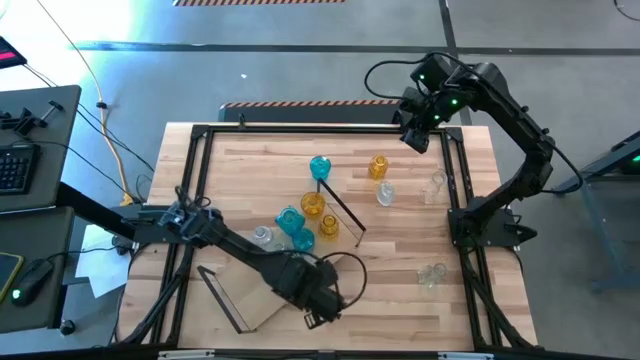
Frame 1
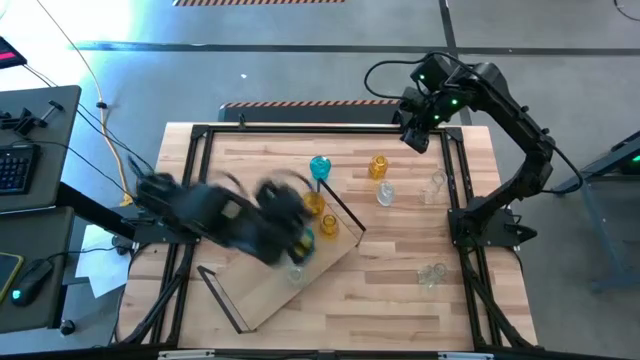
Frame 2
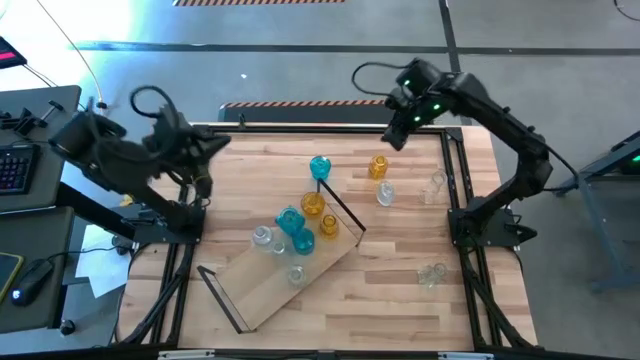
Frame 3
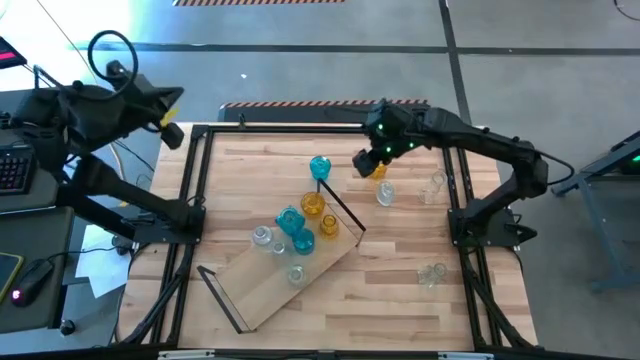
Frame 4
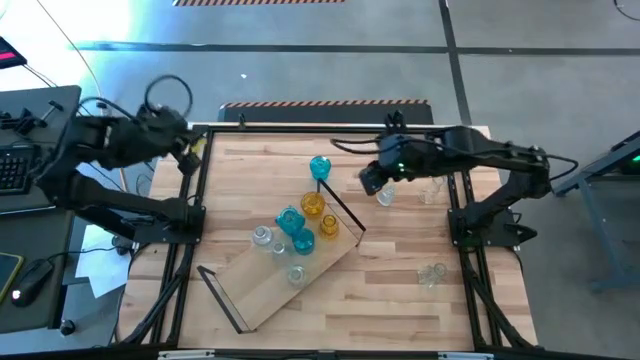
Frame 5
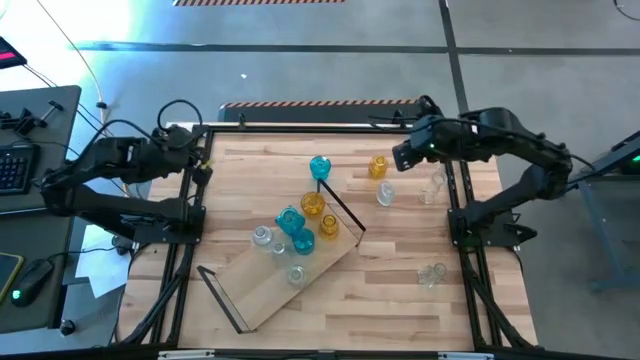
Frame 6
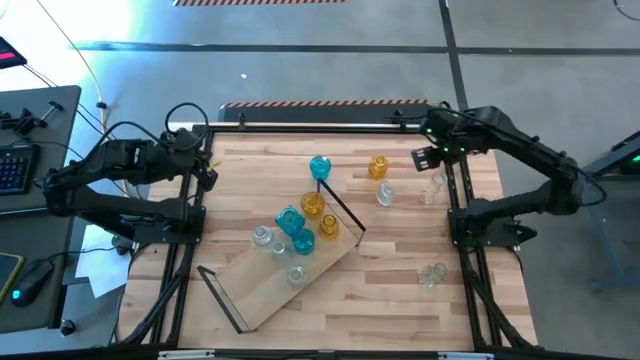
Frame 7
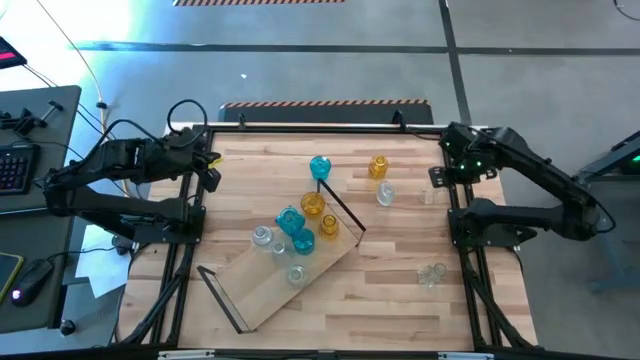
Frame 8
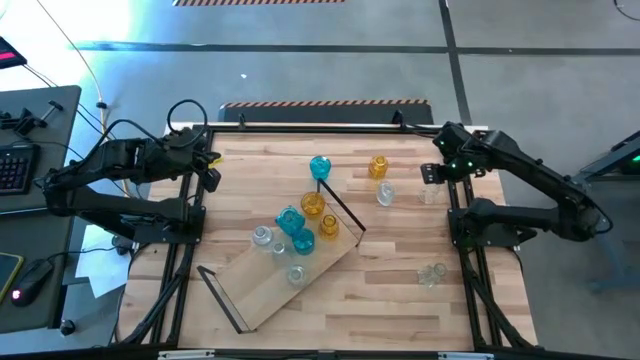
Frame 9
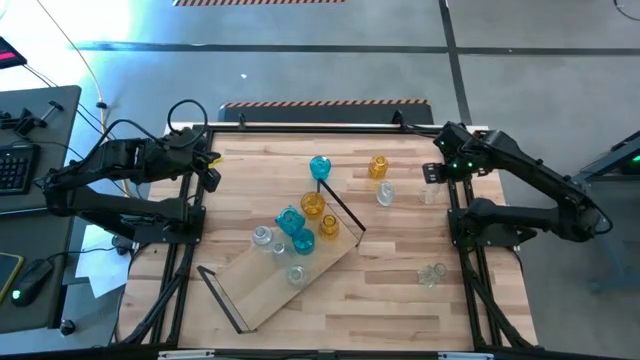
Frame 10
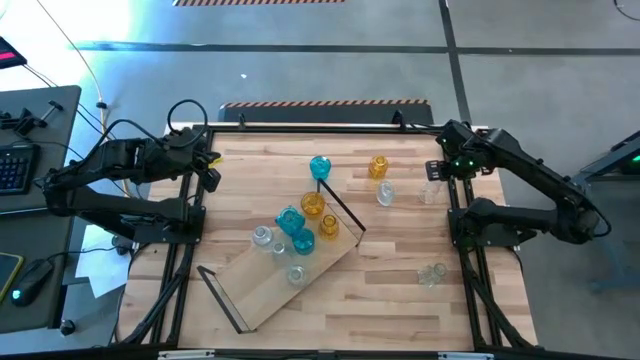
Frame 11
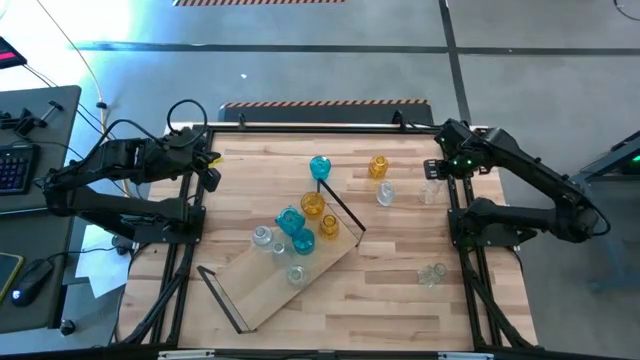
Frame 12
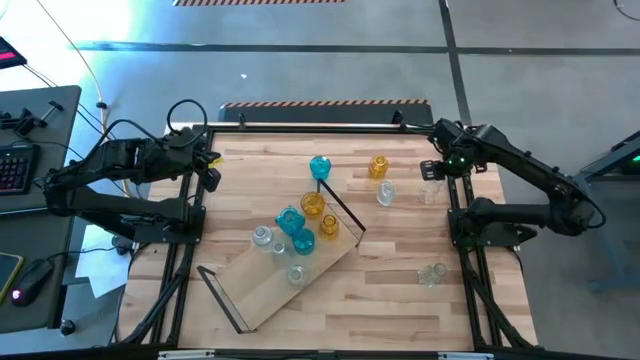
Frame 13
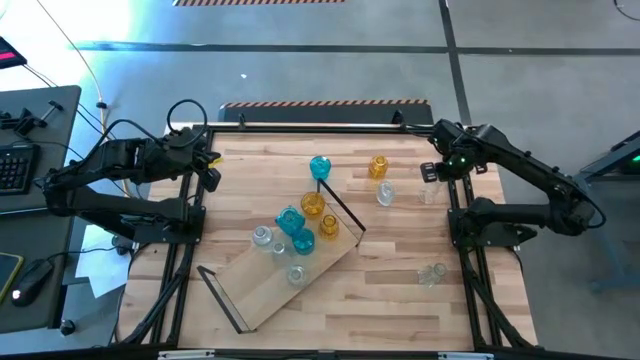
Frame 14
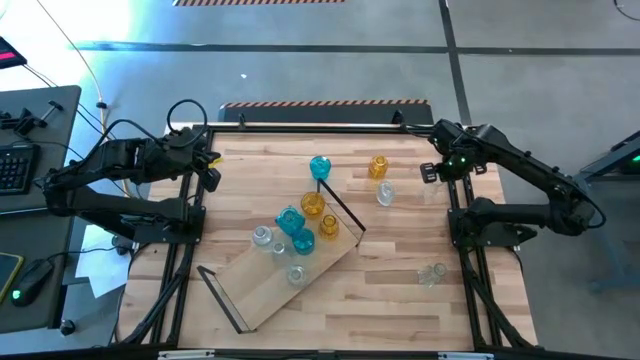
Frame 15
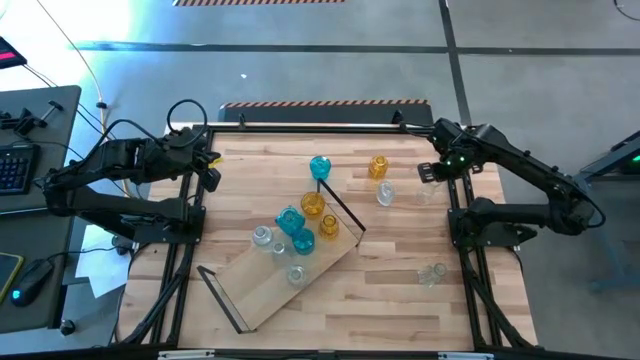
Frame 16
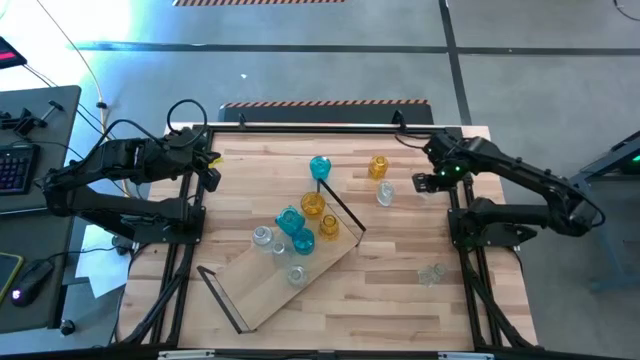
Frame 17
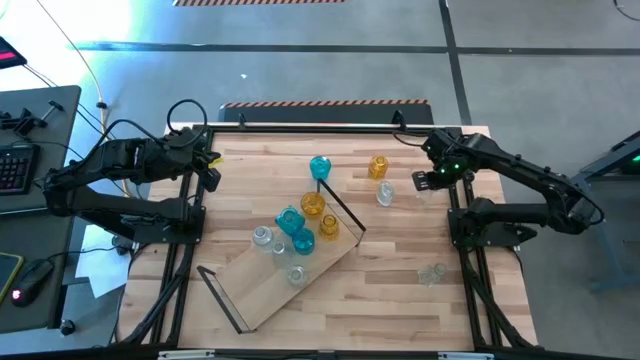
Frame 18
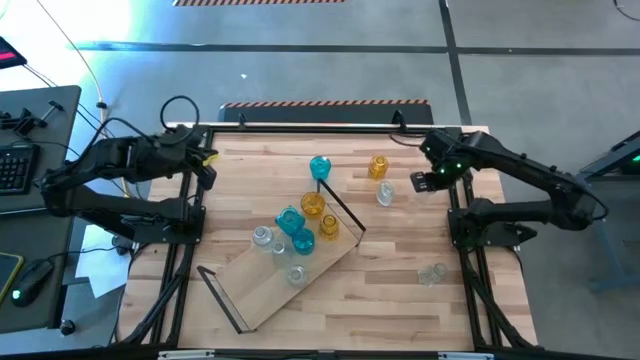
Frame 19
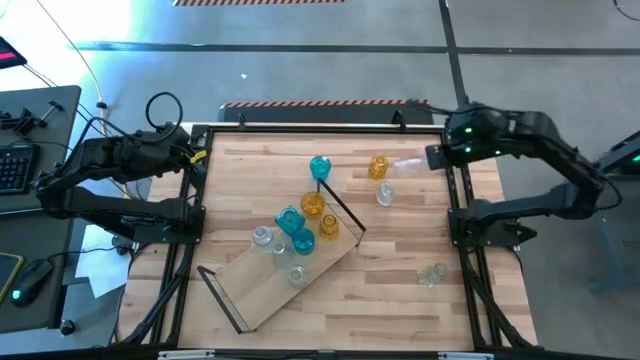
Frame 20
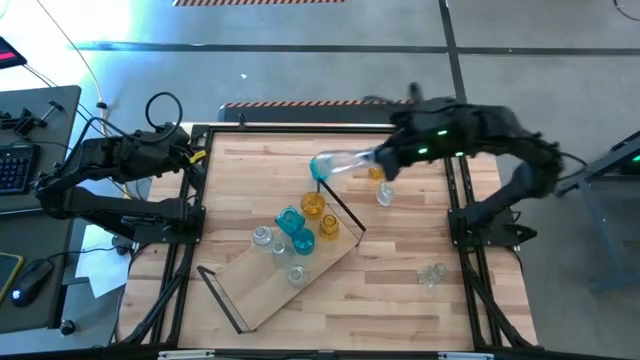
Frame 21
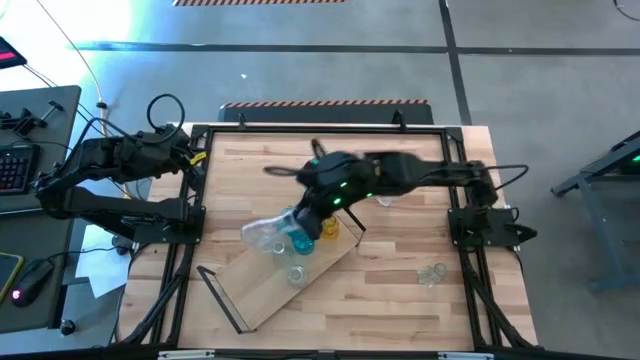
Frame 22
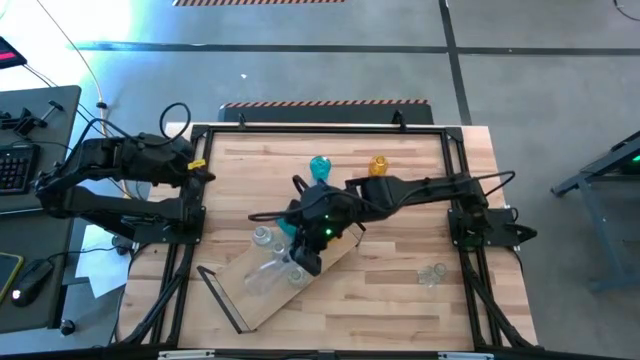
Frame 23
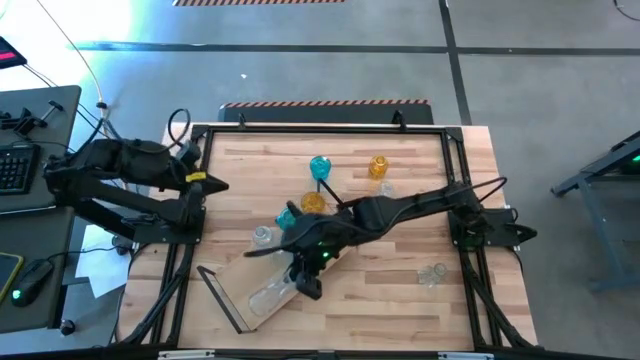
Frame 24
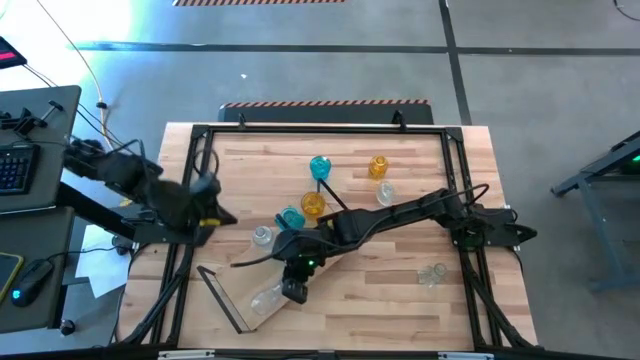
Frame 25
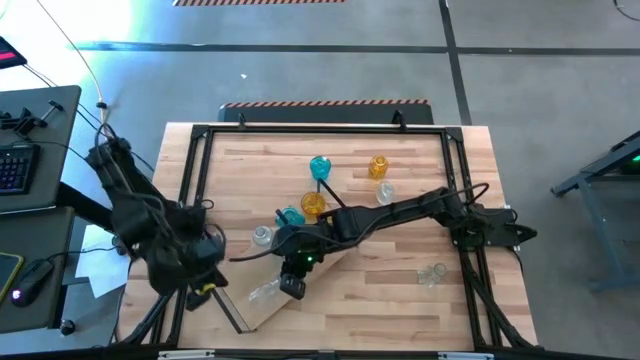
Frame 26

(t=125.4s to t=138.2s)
Task: sort vases onto shelf
Put the transparent vase on the shelf

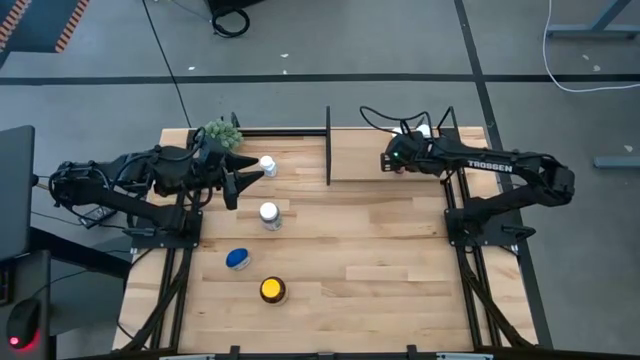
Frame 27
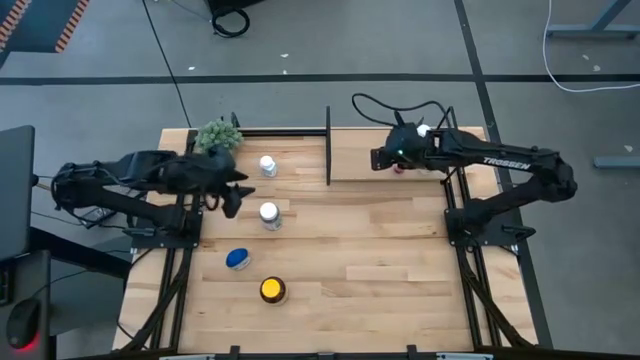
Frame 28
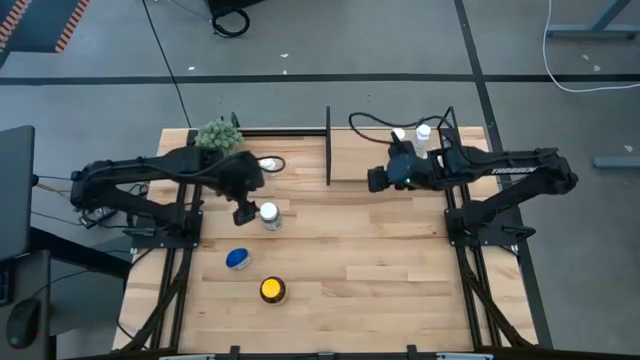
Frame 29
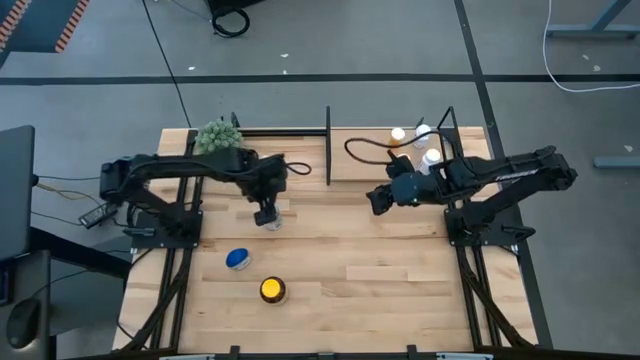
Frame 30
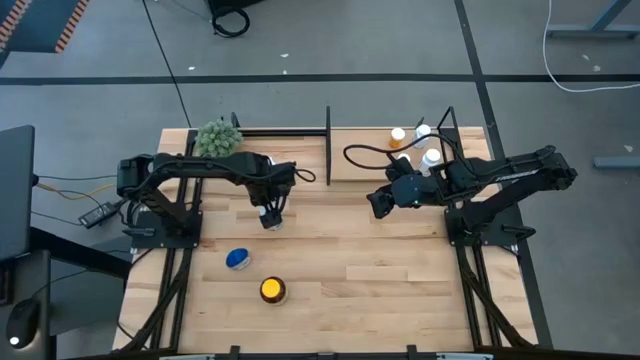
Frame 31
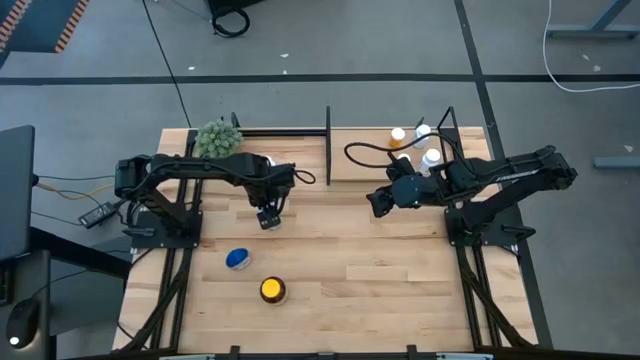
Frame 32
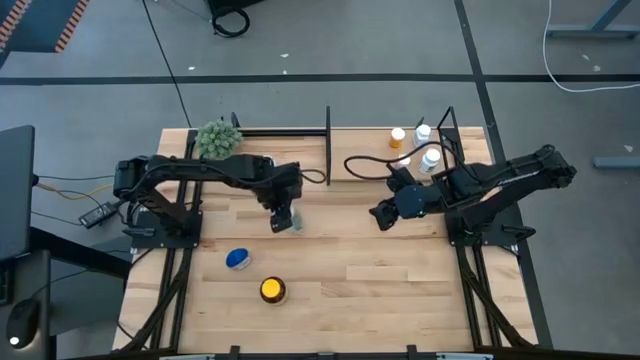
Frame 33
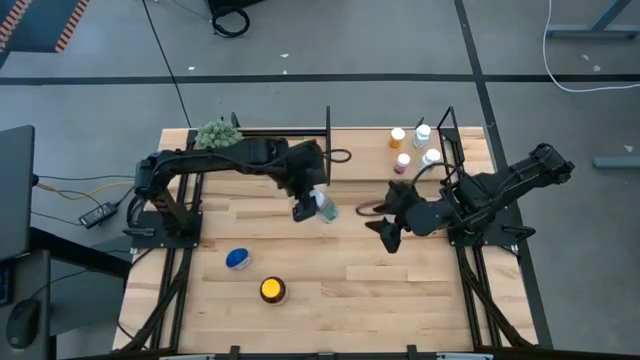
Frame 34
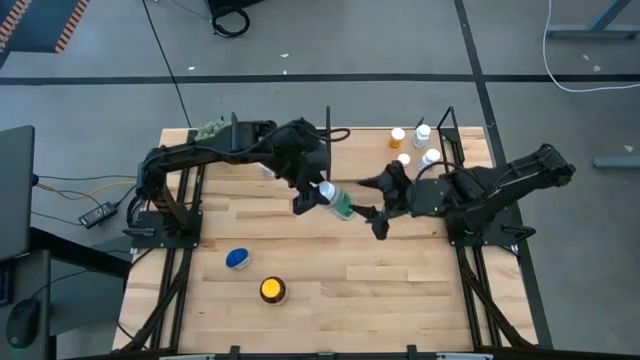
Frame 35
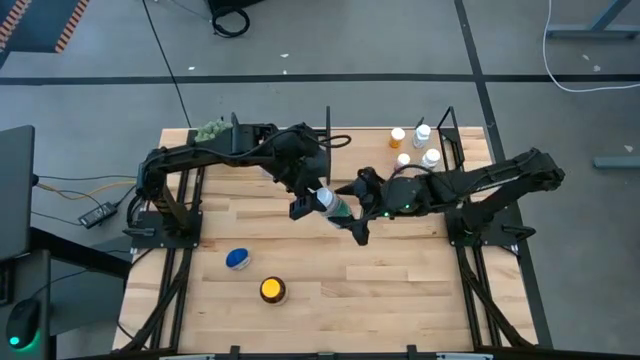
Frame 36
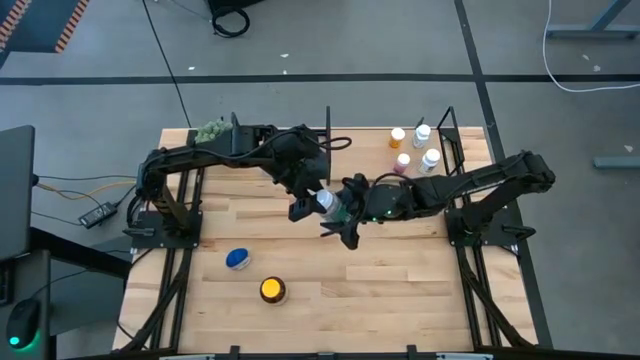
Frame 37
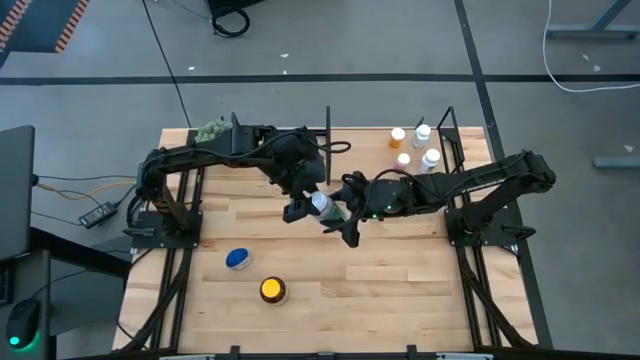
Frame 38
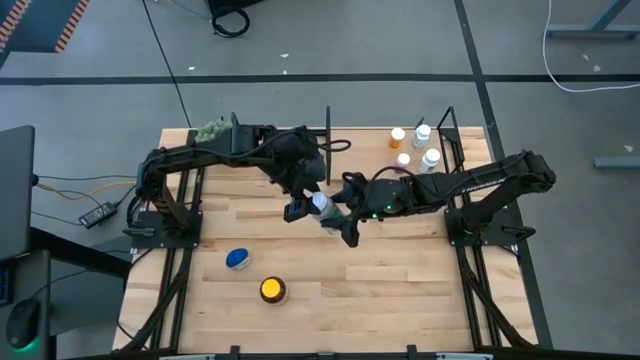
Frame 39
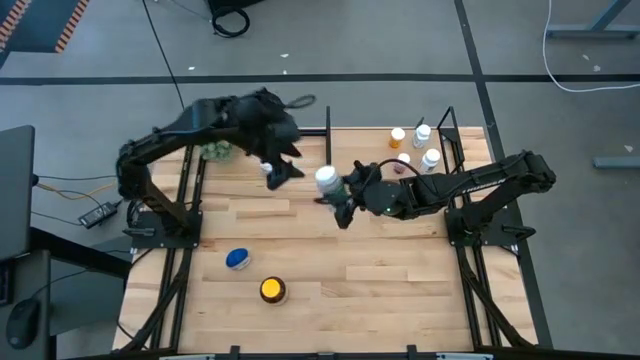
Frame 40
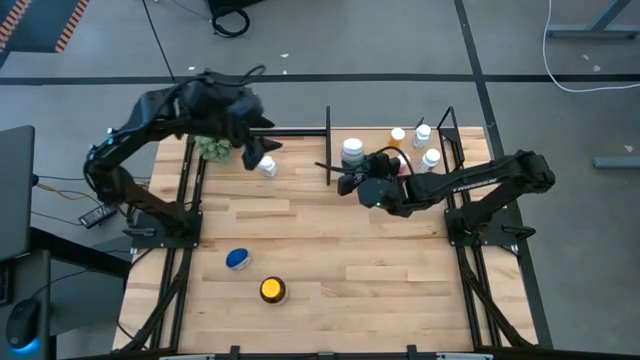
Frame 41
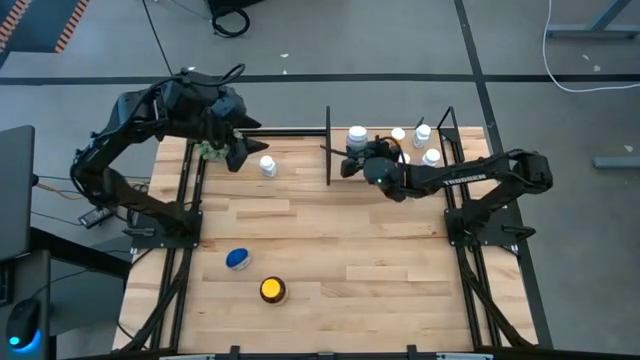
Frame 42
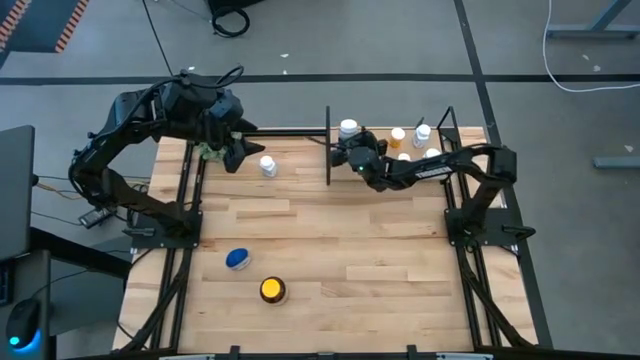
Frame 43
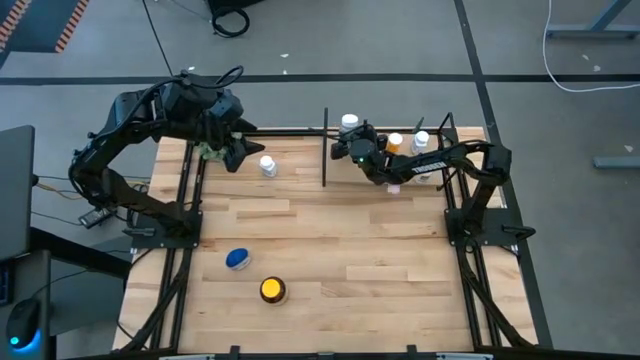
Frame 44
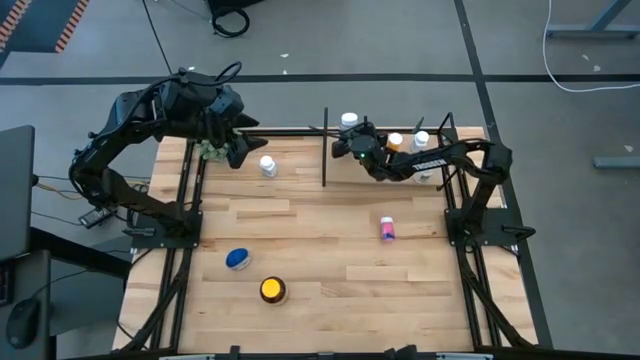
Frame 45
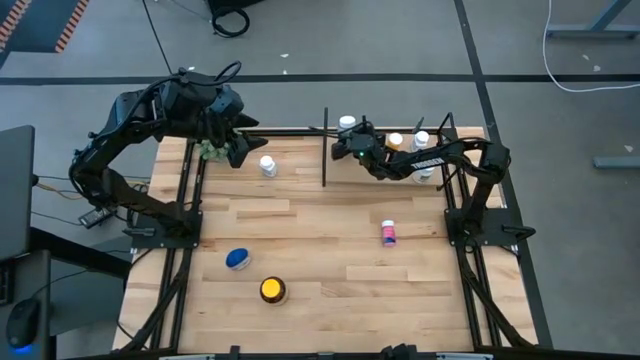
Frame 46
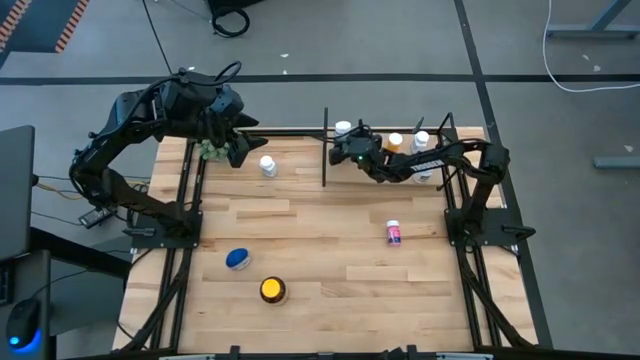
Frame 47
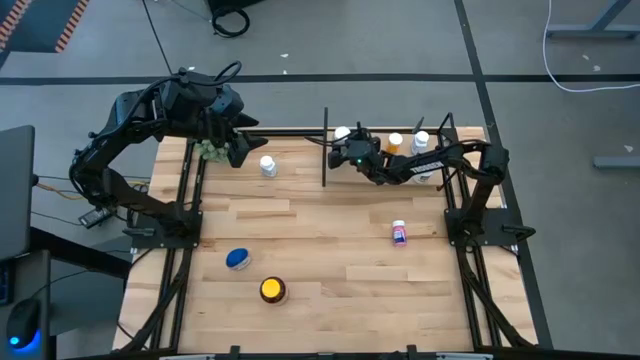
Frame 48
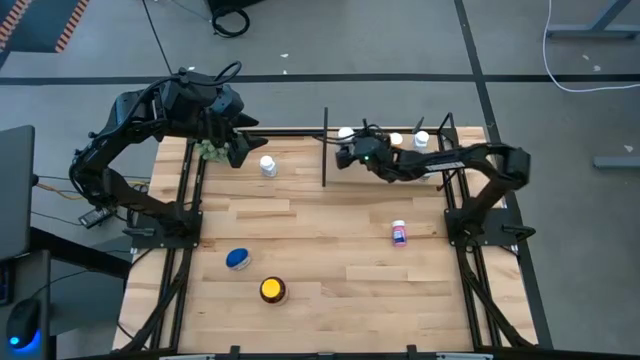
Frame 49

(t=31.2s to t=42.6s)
Task: Pick and place medicine bottles onto shelf by color
Put the green pill bottle on the shelf
